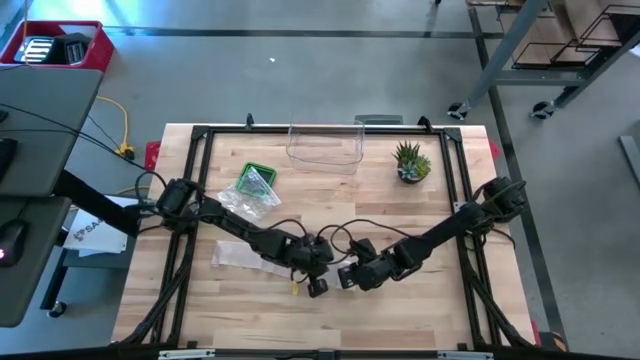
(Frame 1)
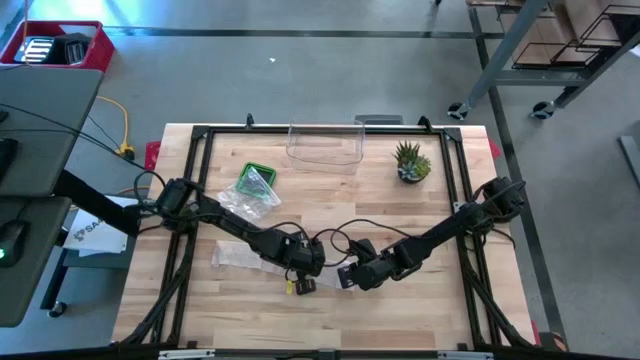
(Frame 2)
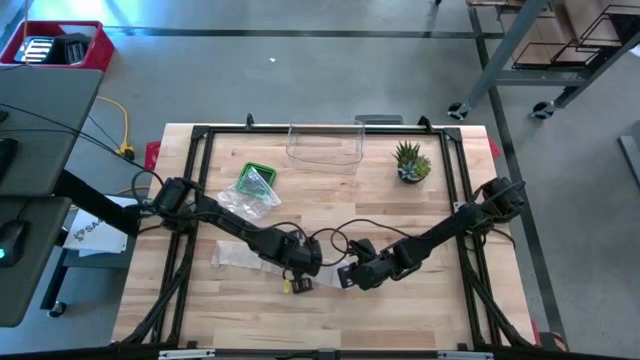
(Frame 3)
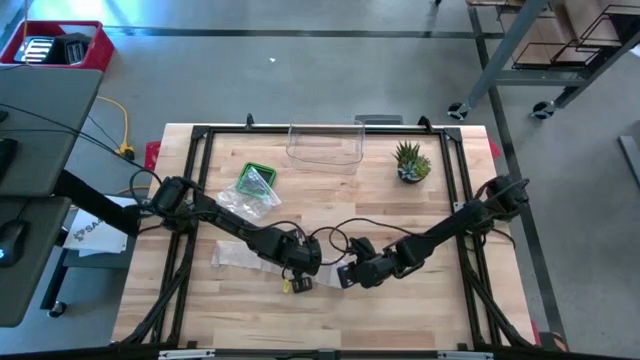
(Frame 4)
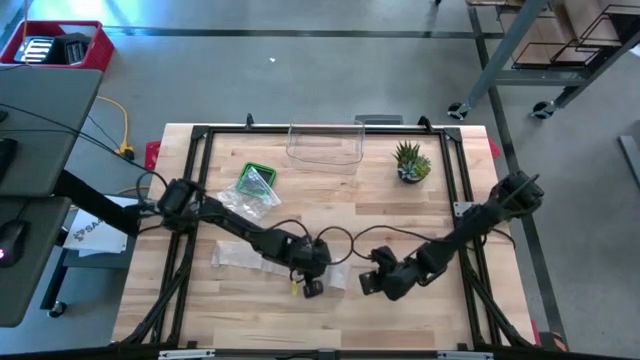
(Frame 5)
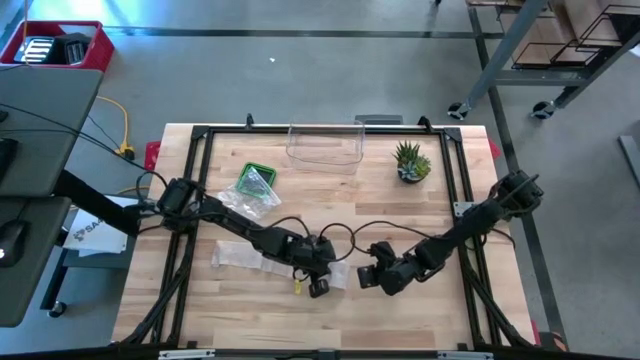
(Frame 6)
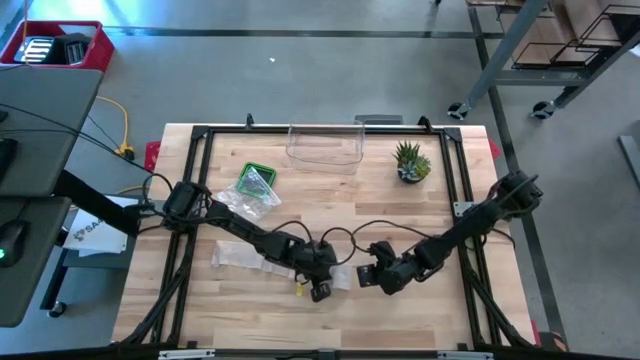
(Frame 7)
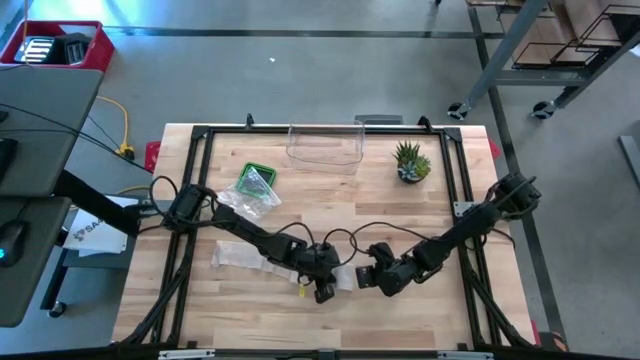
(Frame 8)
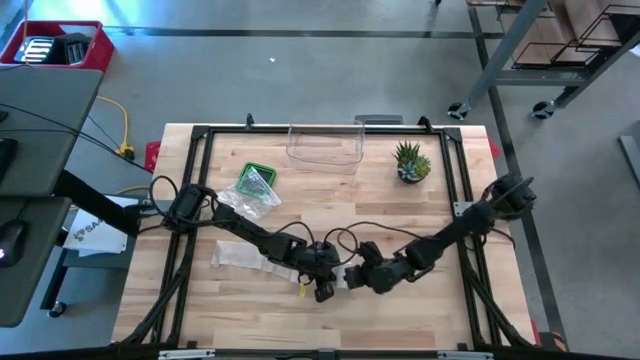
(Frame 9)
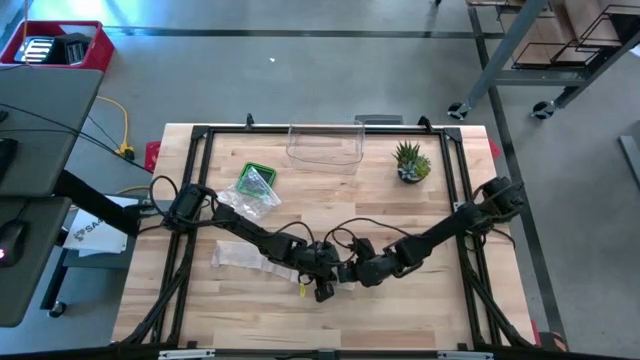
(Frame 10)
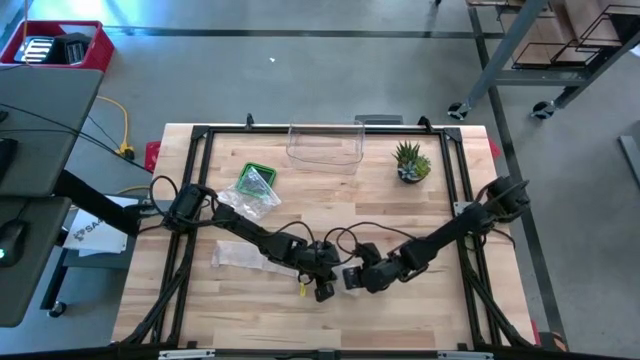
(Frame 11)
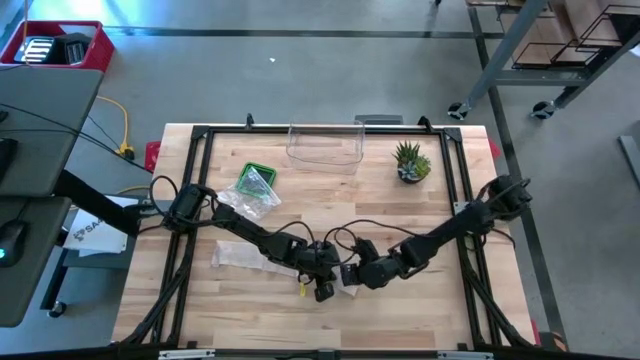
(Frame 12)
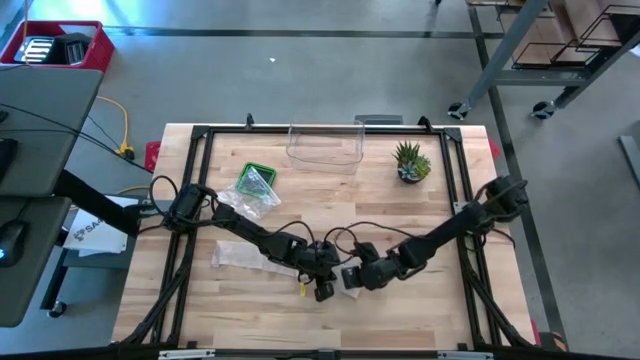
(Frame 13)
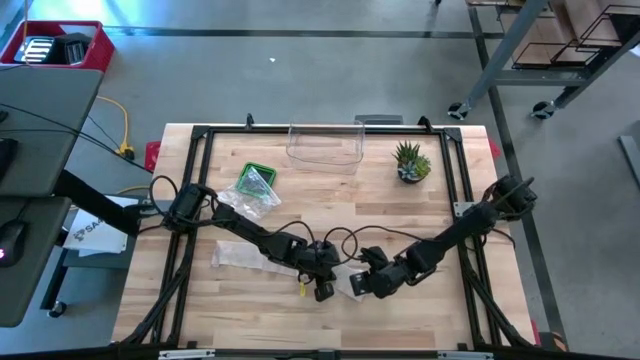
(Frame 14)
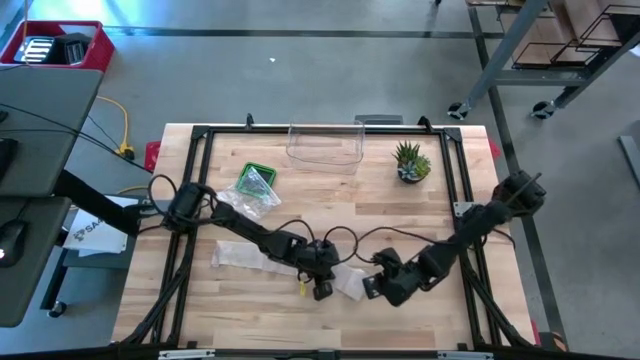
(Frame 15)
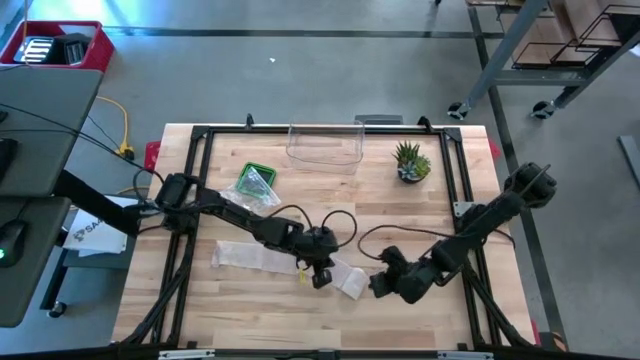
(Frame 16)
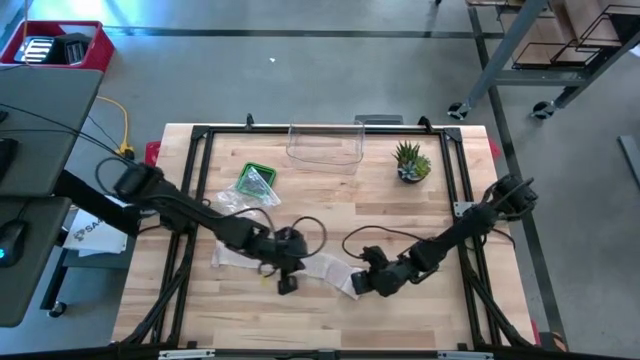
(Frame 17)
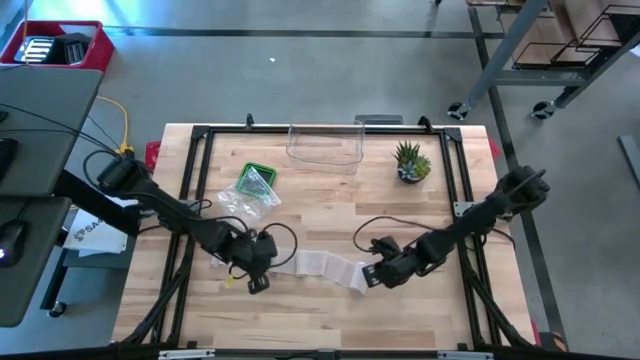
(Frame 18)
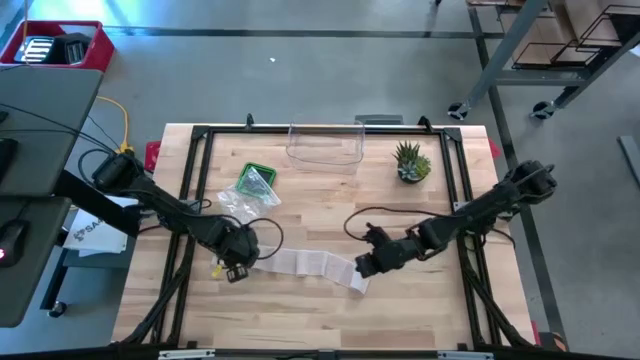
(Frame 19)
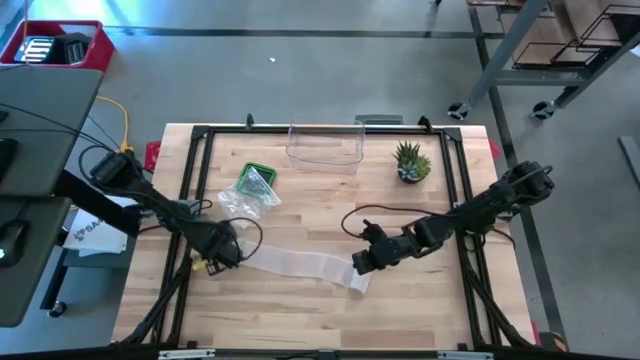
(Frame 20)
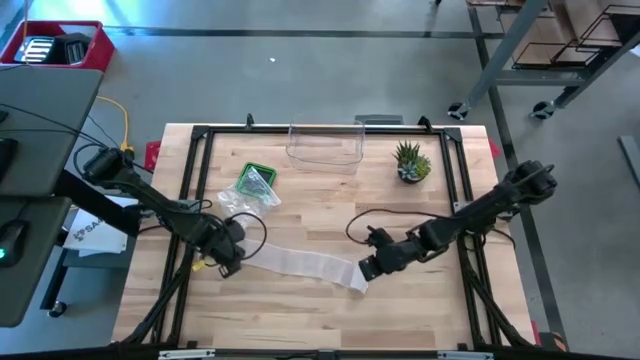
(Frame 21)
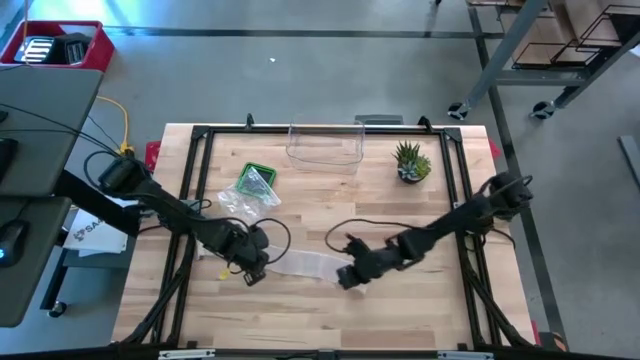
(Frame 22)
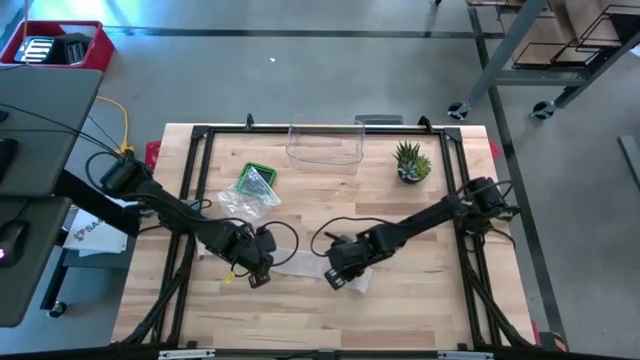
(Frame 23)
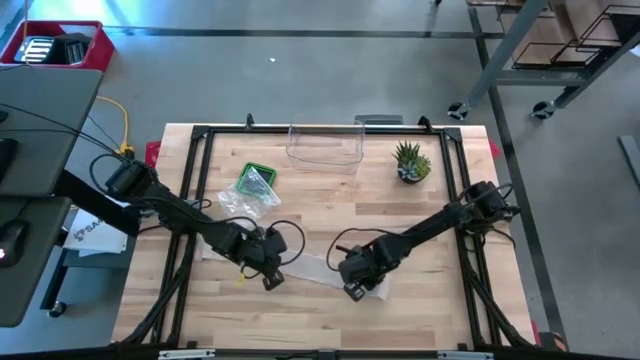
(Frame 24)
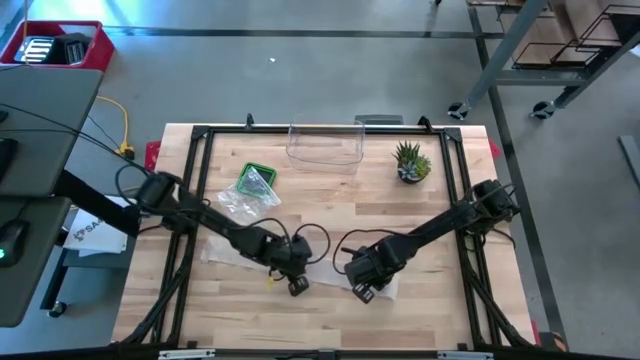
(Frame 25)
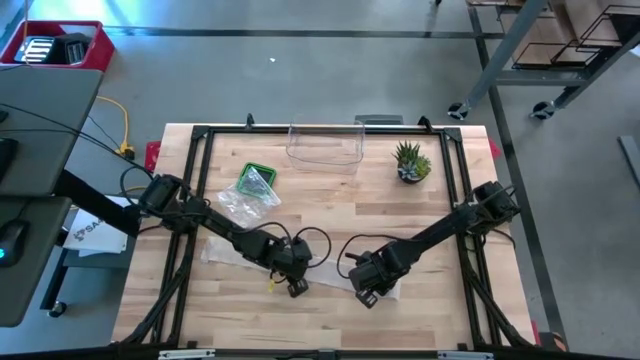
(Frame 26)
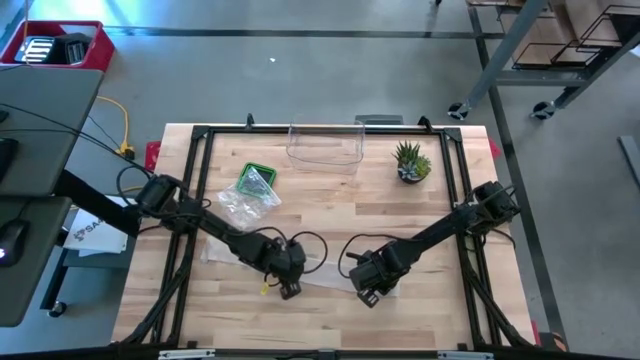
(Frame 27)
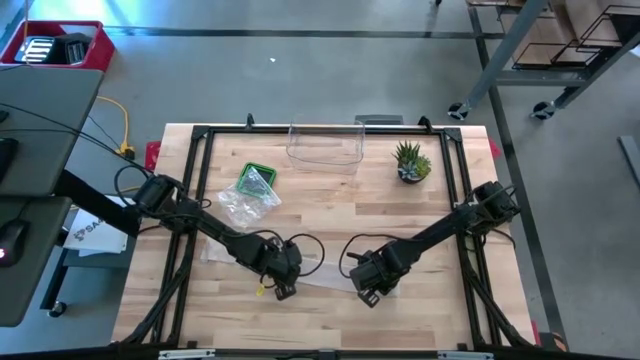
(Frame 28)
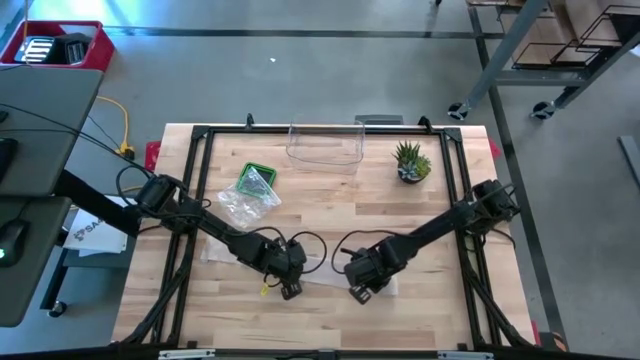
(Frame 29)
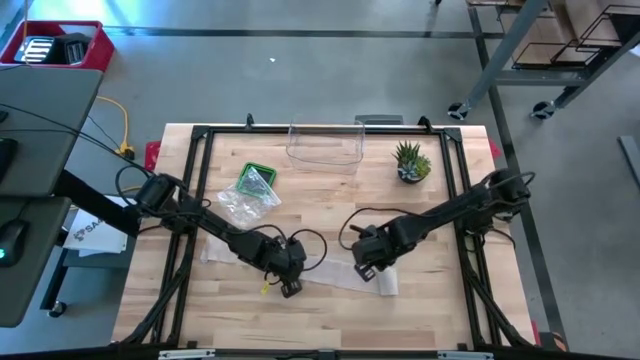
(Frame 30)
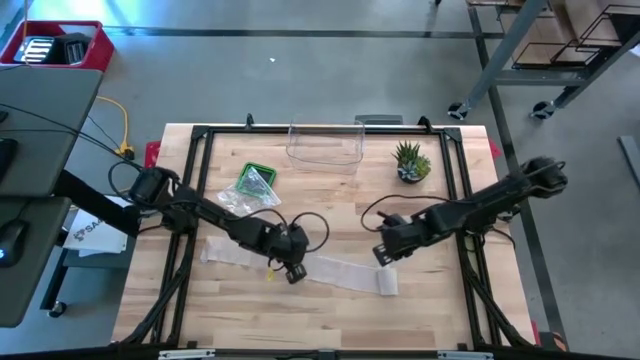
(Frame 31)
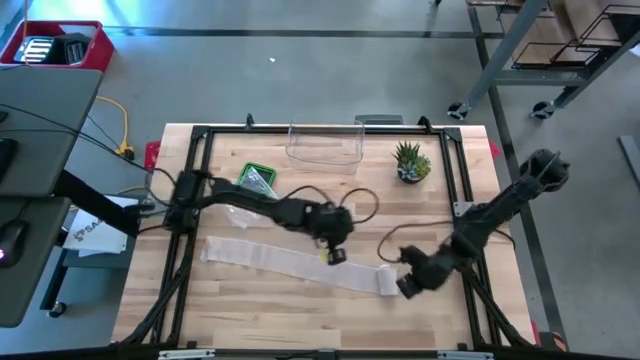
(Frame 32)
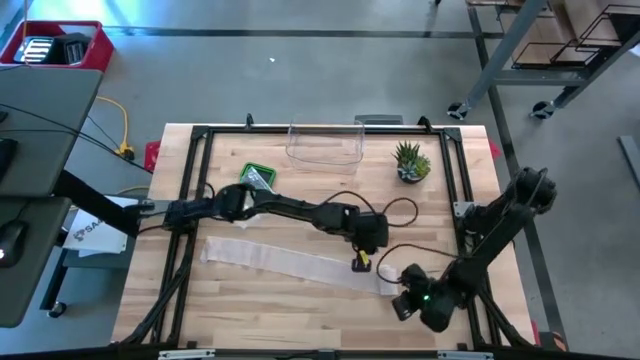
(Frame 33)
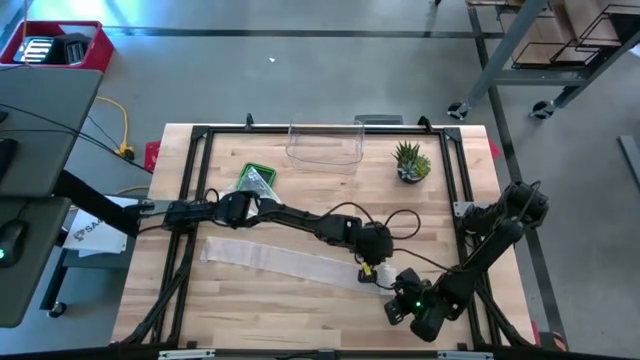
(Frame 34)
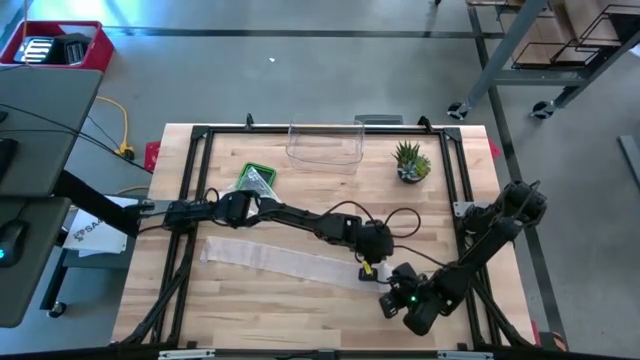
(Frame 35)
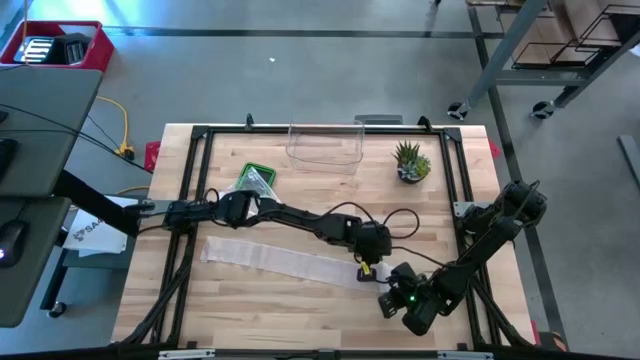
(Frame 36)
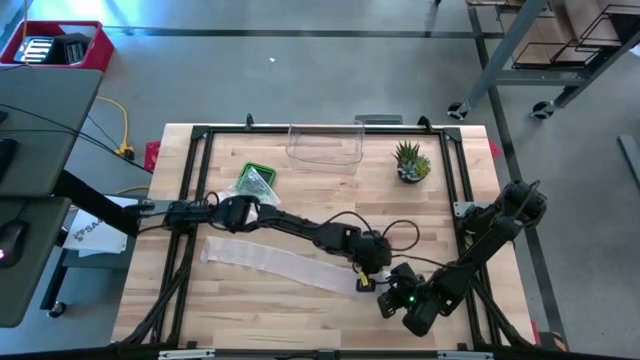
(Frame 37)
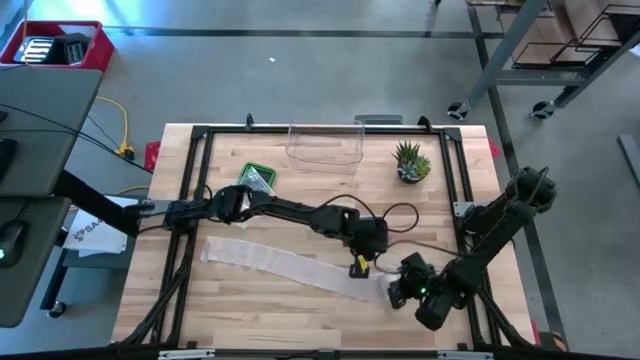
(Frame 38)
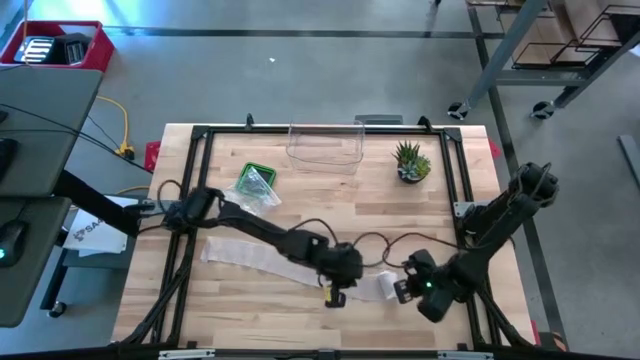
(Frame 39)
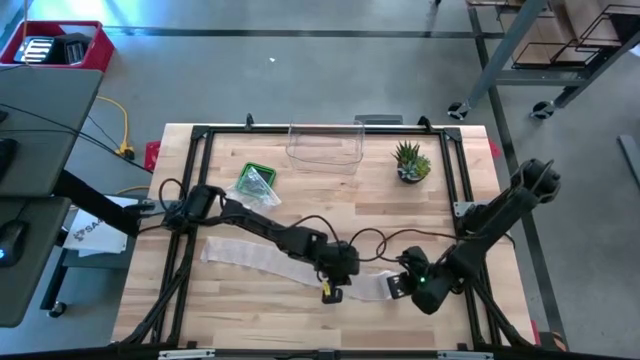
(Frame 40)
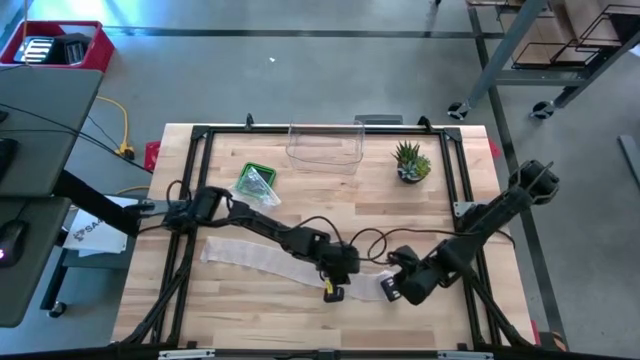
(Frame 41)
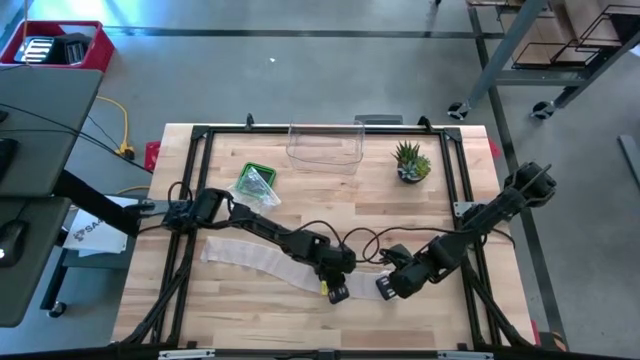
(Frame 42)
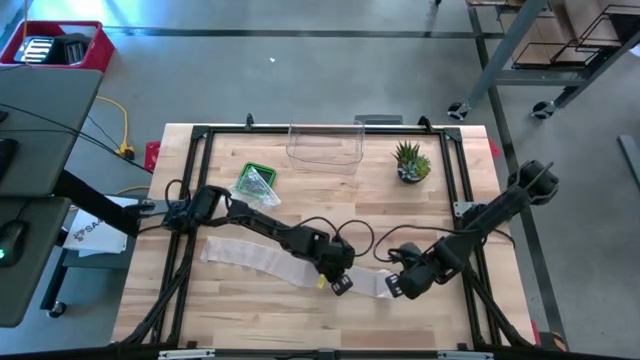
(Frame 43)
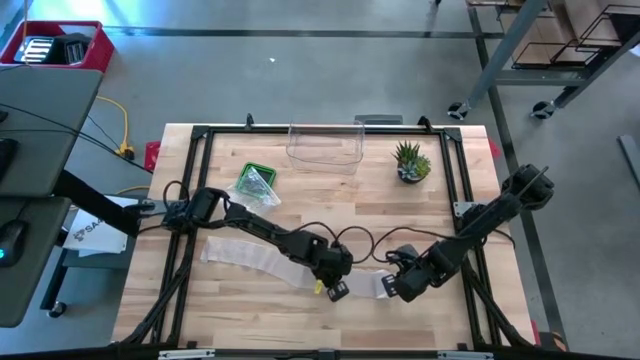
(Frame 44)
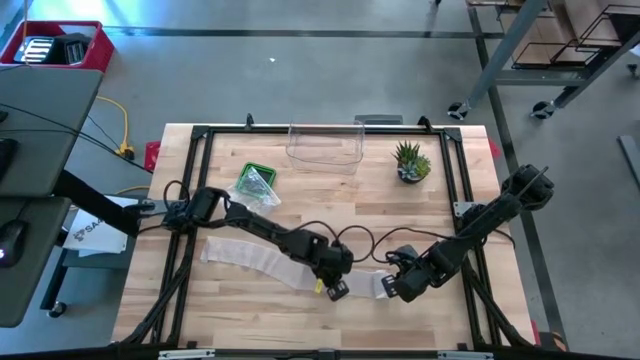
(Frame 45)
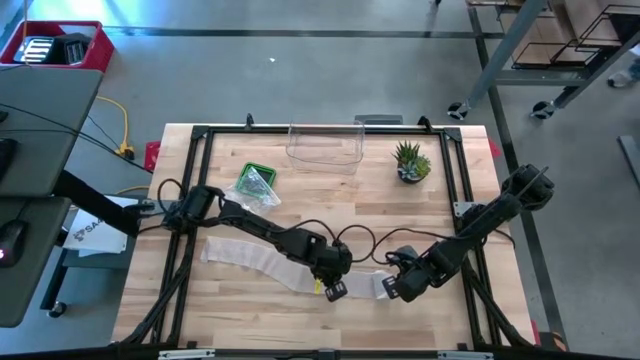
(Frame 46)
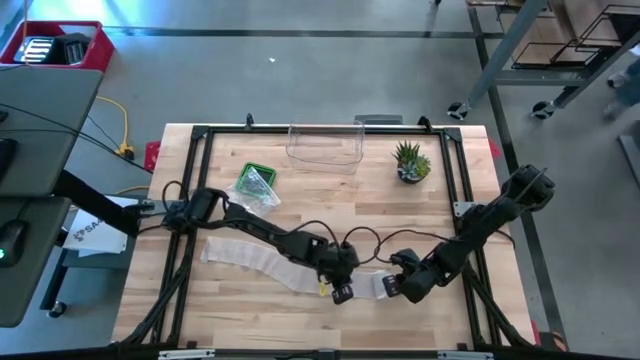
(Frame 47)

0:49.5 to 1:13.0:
Task: Roll bandage
Roll the bandage
